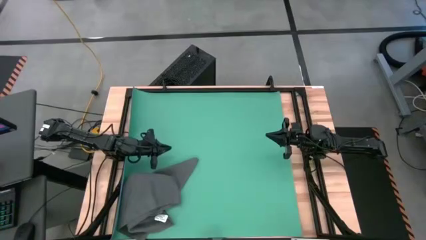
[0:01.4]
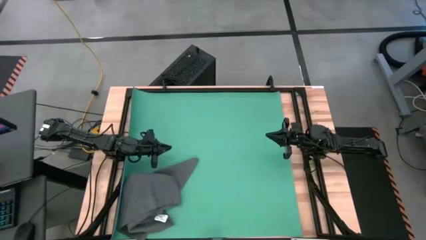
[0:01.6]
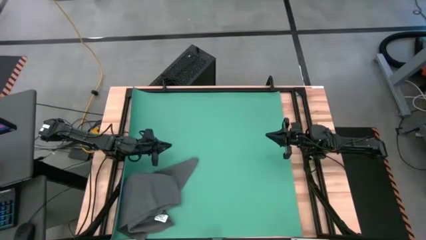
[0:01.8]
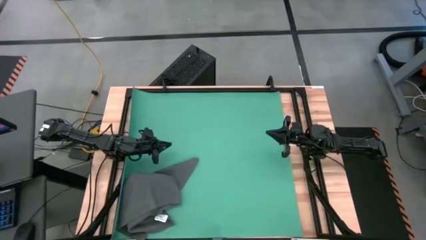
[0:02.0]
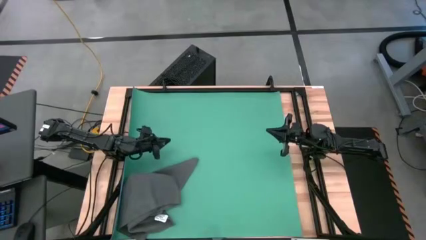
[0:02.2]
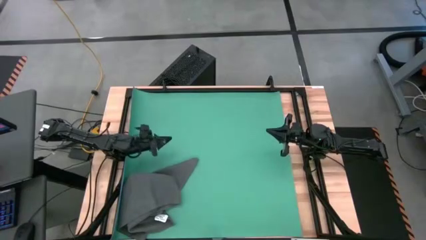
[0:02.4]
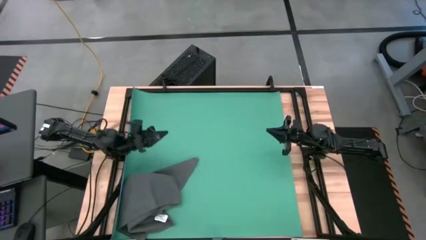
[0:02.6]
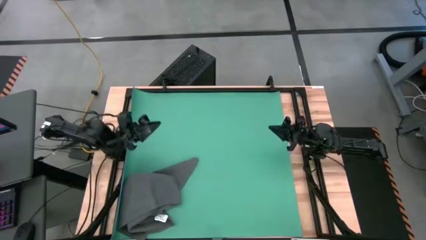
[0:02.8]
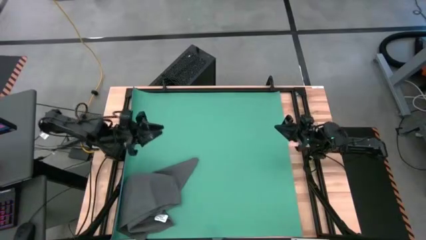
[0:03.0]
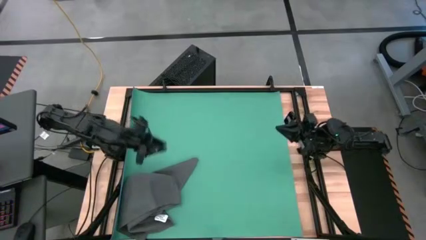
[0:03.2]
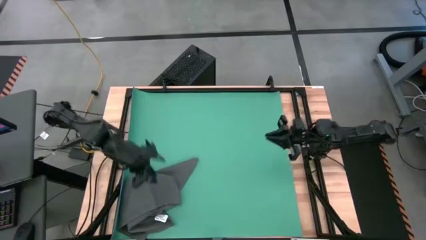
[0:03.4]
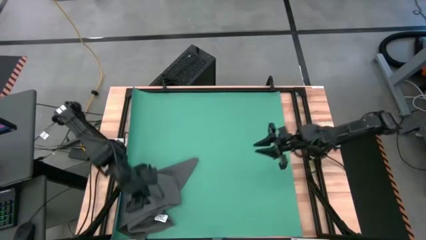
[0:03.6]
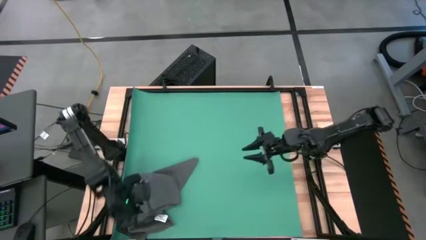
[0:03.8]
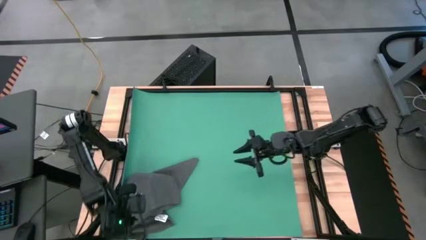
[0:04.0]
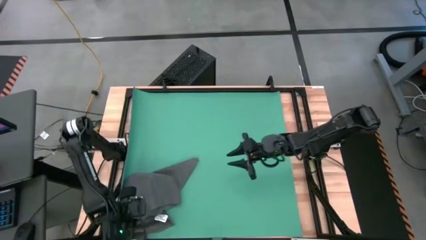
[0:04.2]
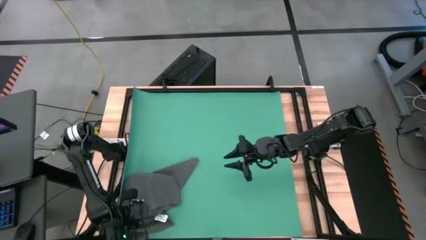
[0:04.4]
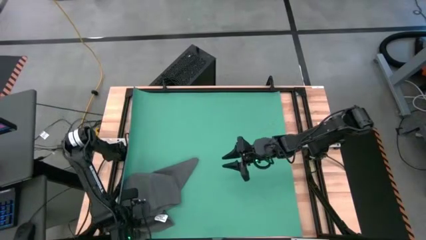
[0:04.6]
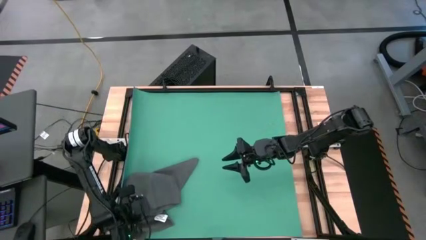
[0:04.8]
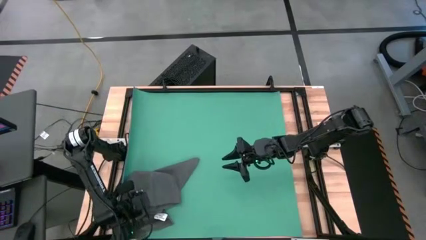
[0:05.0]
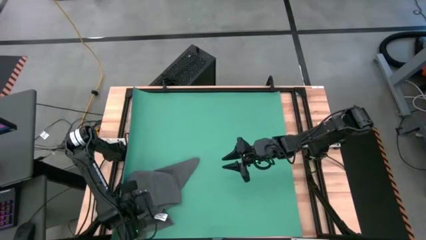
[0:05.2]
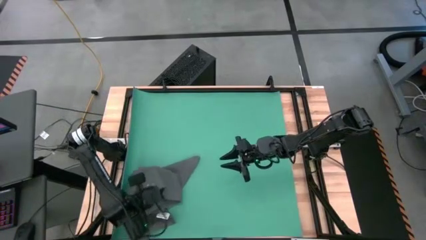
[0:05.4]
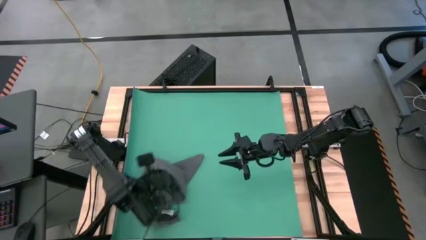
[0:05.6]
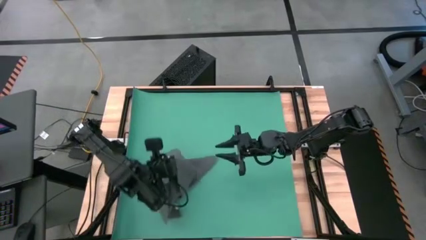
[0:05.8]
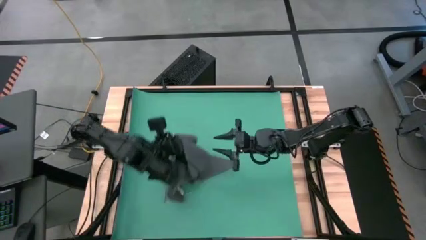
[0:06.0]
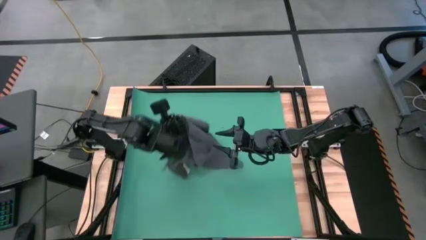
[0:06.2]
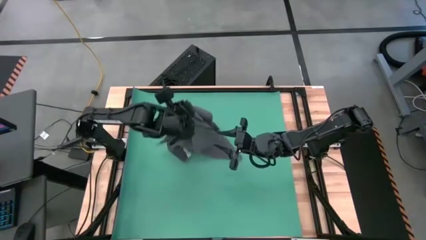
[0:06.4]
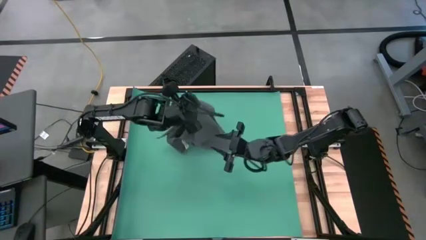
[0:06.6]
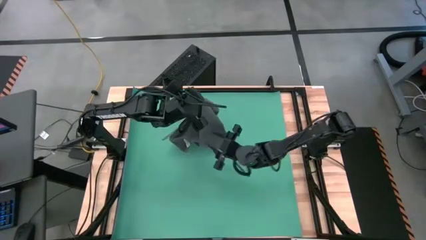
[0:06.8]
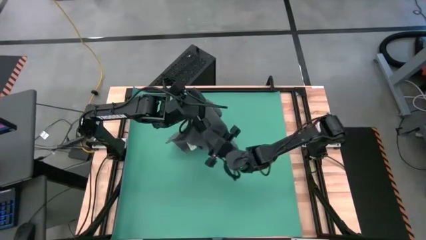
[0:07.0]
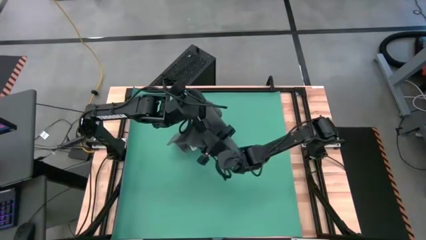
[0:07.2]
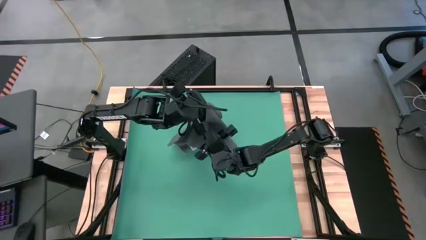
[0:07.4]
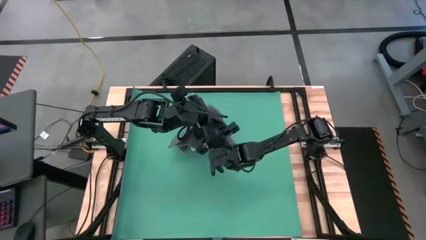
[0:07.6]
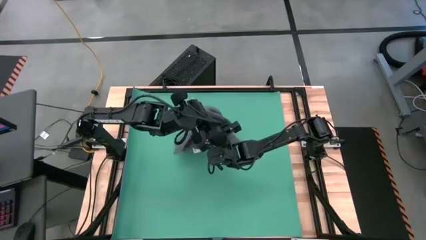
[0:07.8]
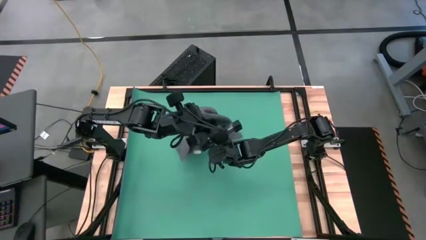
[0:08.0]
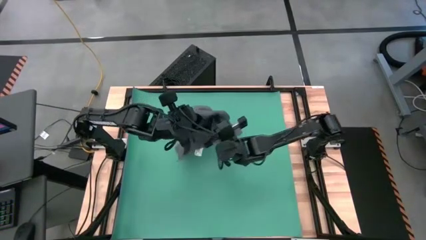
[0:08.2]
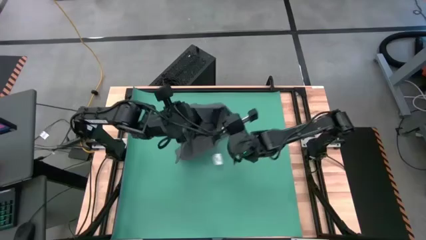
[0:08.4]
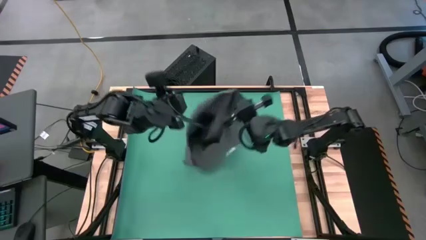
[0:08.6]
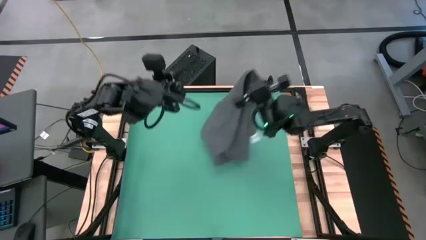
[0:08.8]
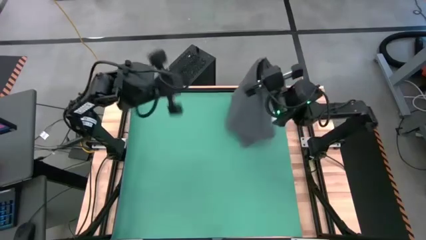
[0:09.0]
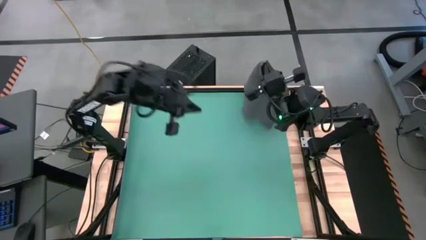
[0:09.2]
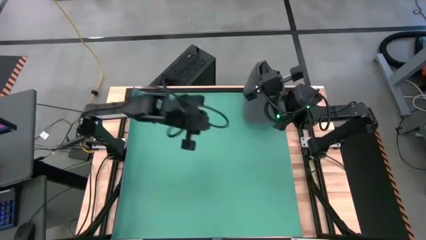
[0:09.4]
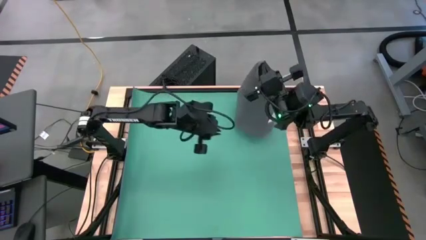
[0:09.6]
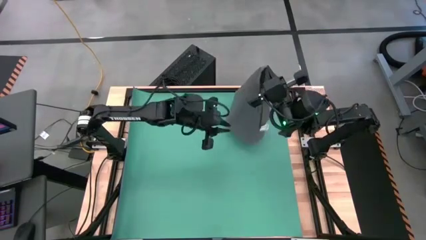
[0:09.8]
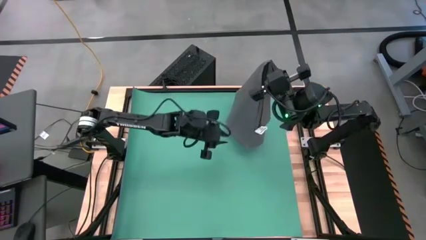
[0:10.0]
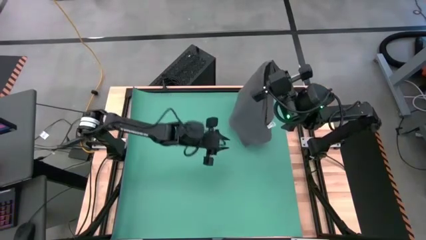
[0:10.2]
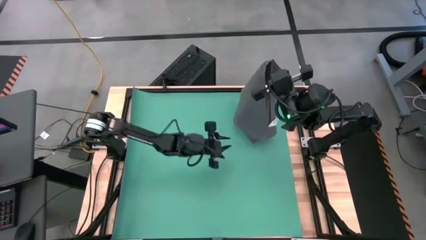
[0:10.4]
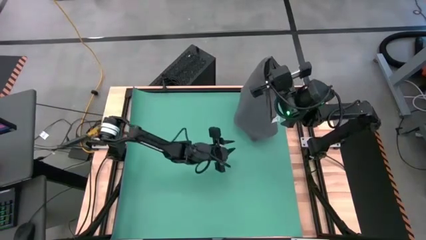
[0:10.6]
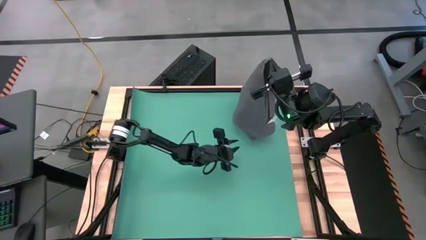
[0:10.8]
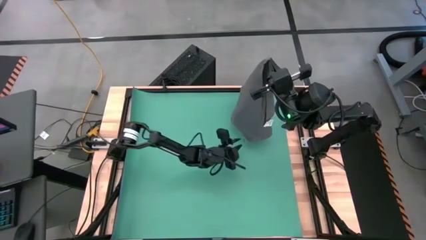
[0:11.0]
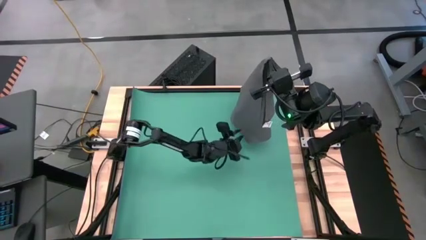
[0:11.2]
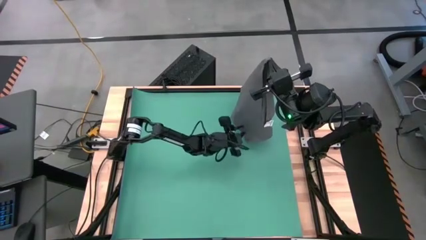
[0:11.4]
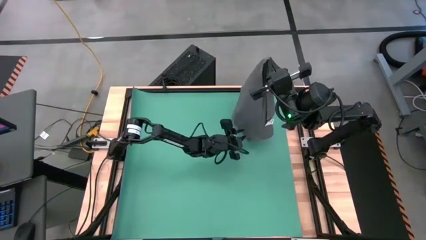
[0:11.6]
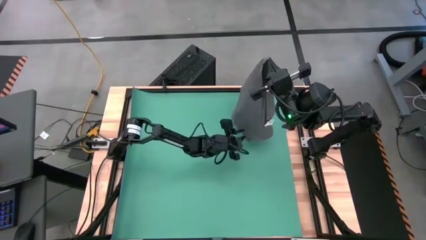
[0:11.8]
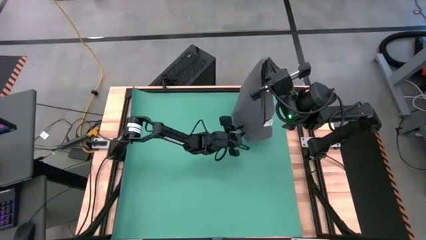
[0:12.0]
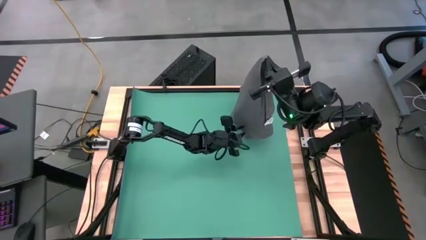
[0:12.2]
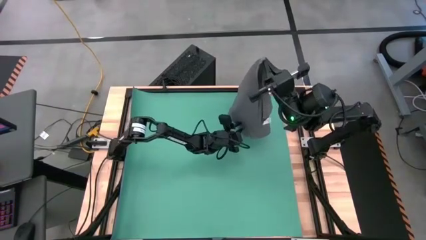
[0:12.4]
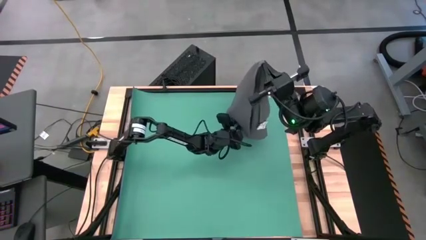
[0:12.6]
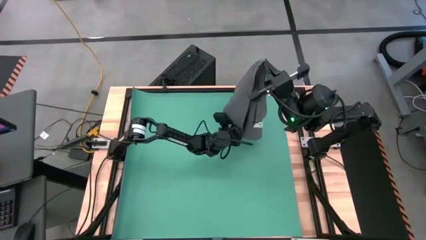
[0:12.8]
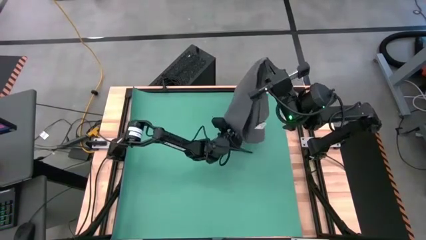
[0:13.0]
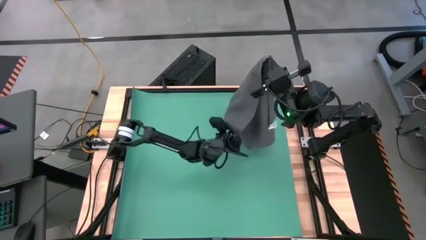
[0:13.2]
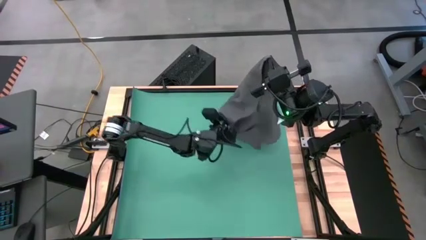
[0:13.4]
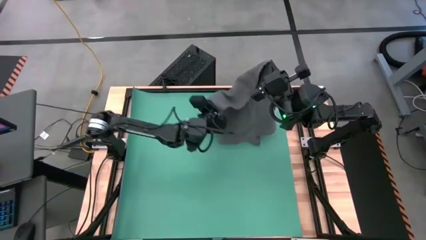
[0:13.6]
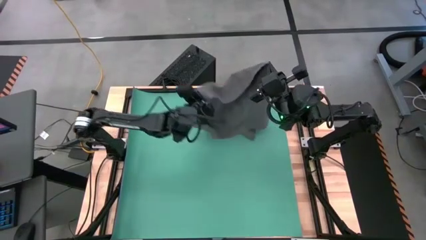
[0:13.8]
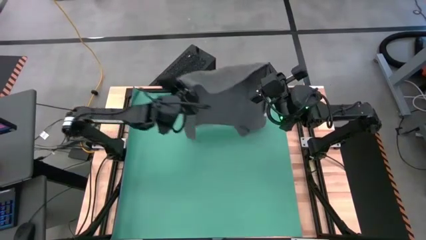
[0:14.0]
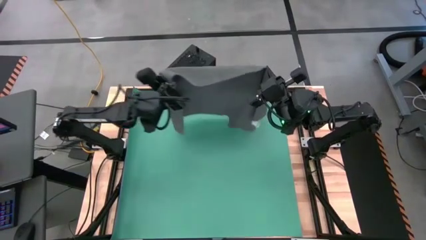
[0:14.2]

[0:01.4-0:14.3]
Task: Roll towel
Roll the gray towel
